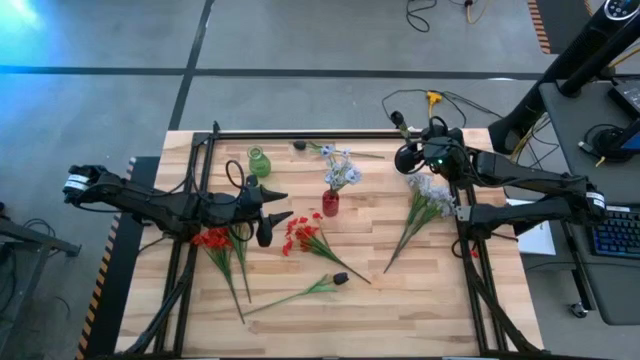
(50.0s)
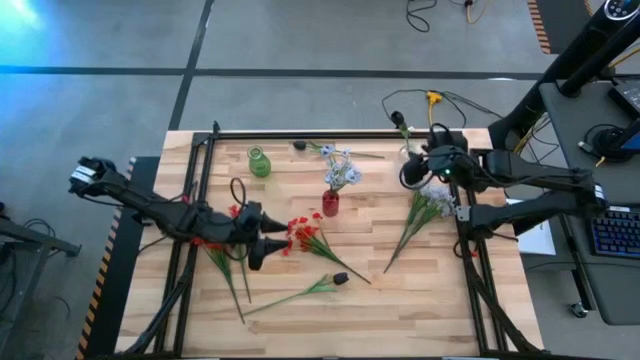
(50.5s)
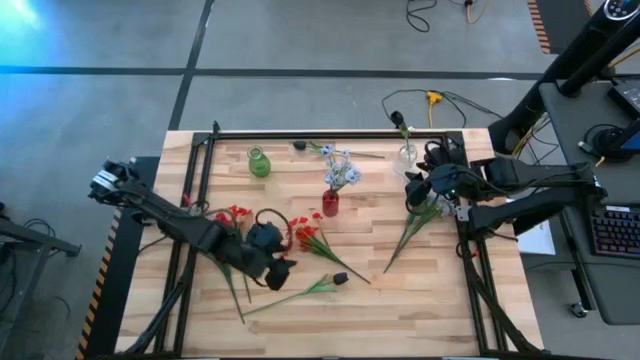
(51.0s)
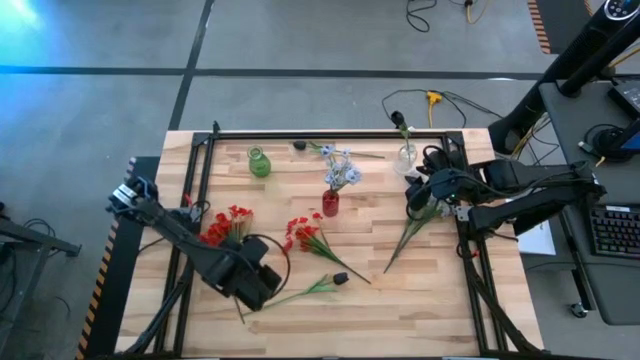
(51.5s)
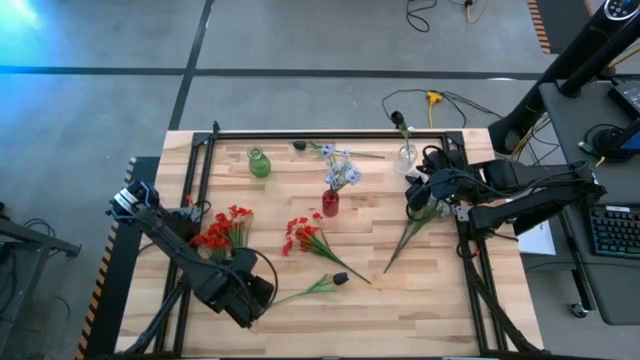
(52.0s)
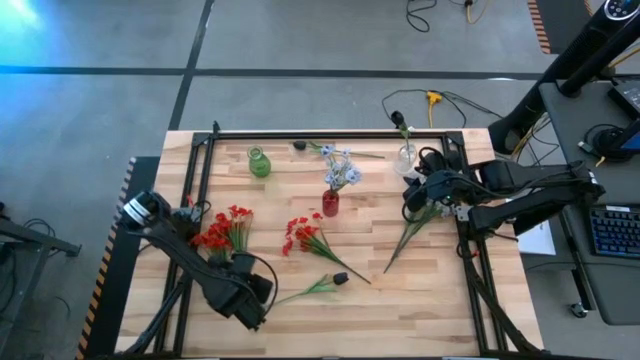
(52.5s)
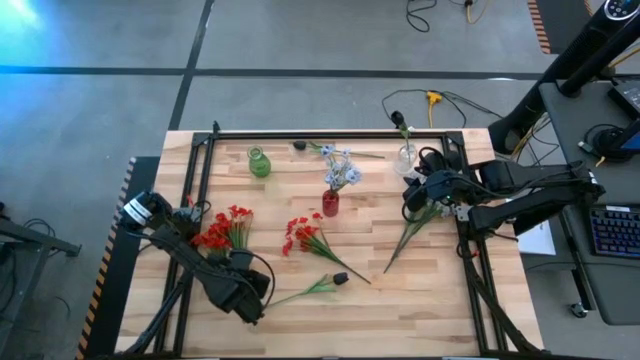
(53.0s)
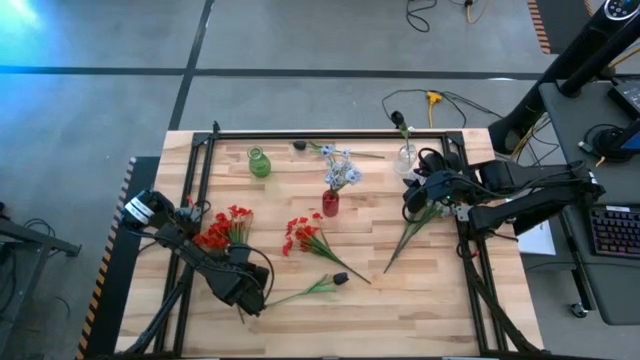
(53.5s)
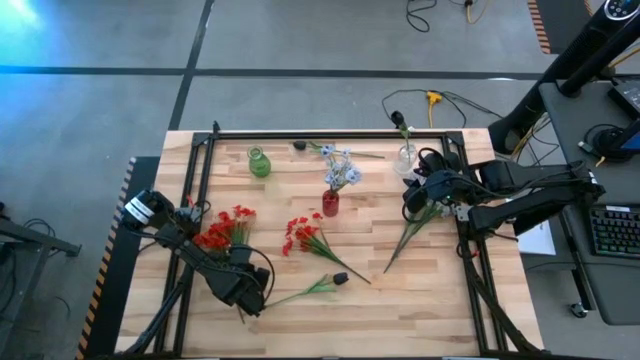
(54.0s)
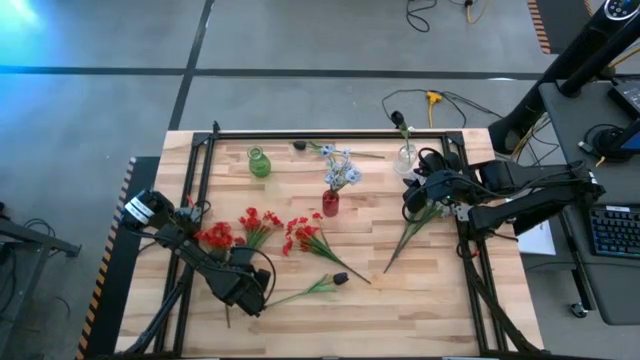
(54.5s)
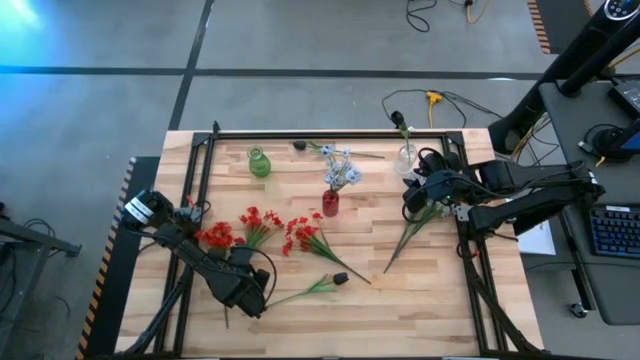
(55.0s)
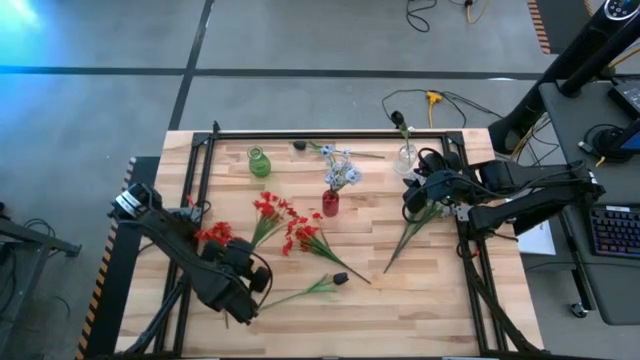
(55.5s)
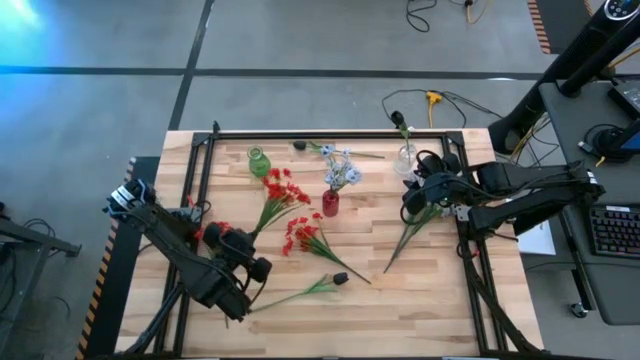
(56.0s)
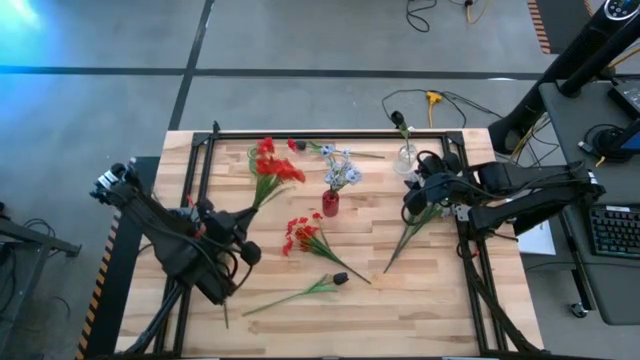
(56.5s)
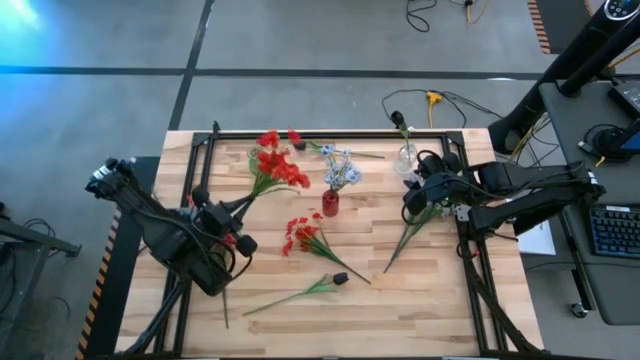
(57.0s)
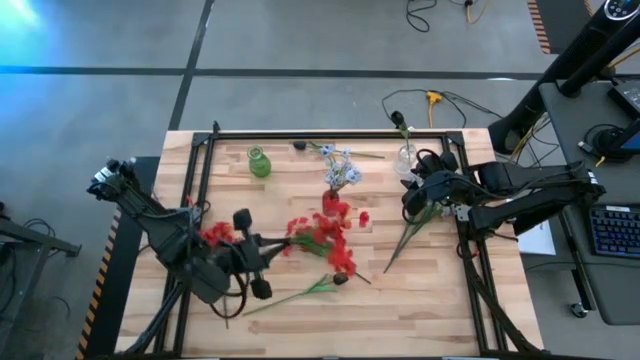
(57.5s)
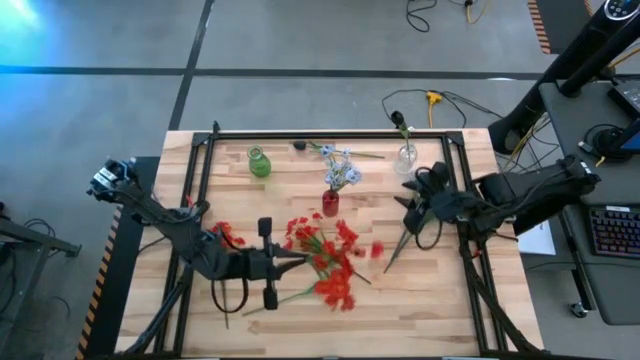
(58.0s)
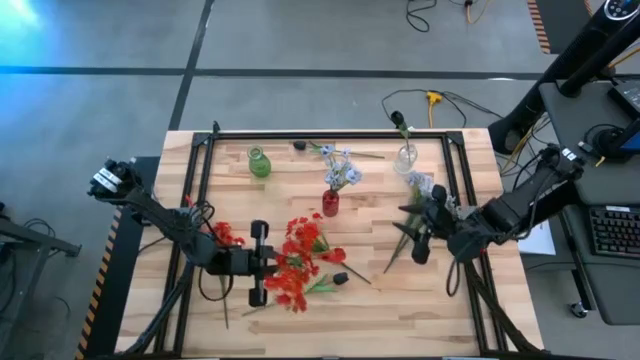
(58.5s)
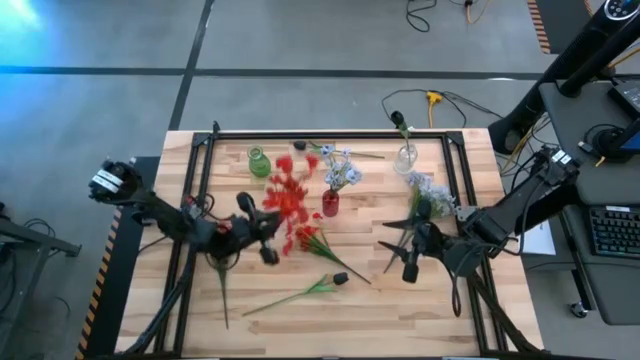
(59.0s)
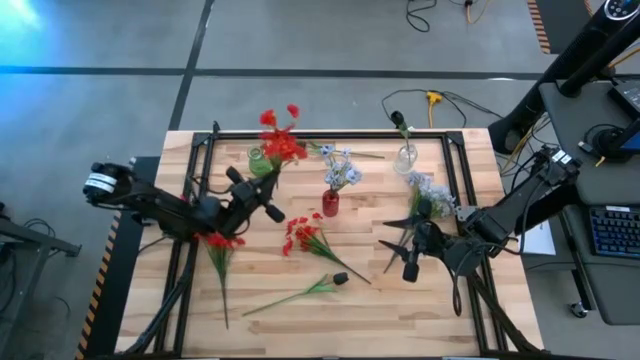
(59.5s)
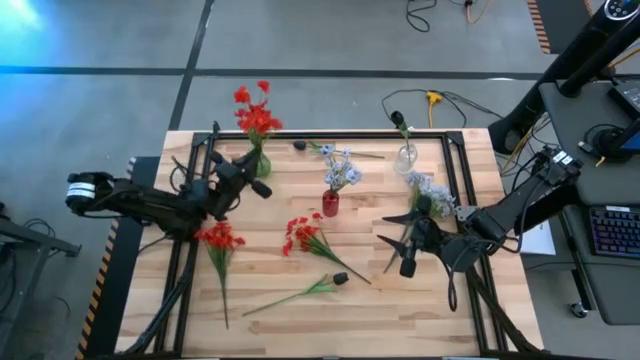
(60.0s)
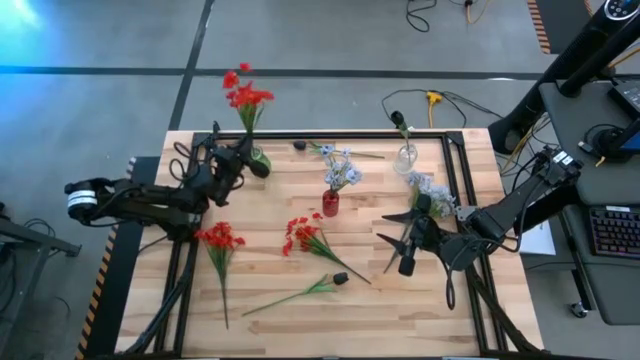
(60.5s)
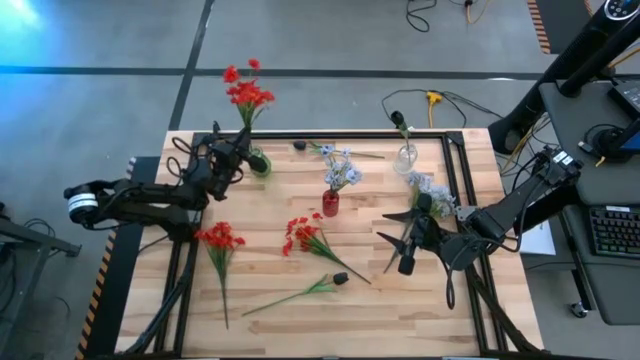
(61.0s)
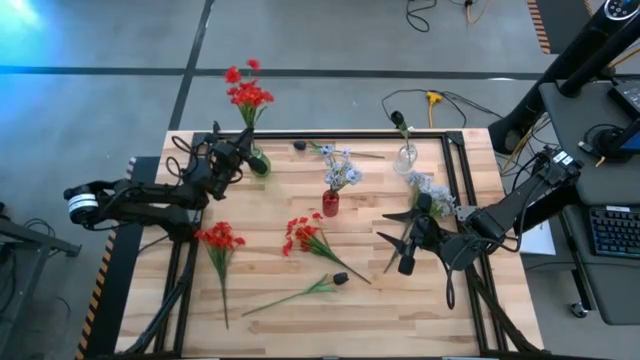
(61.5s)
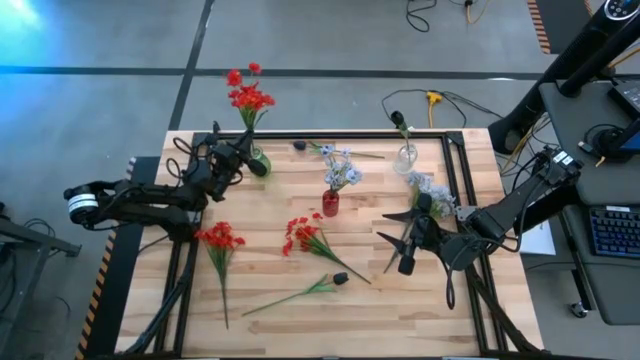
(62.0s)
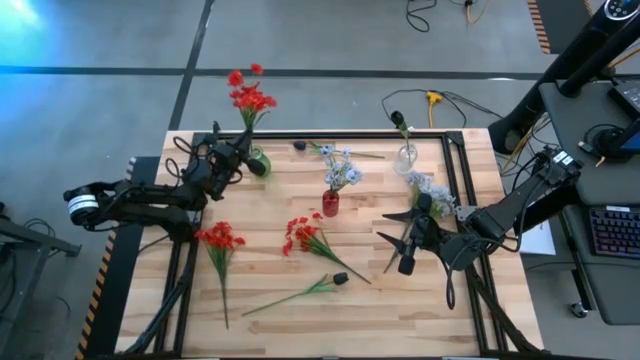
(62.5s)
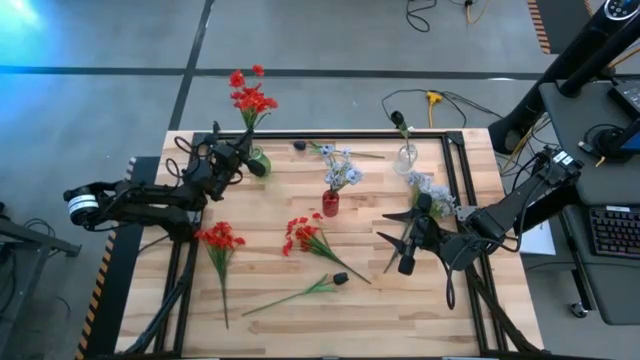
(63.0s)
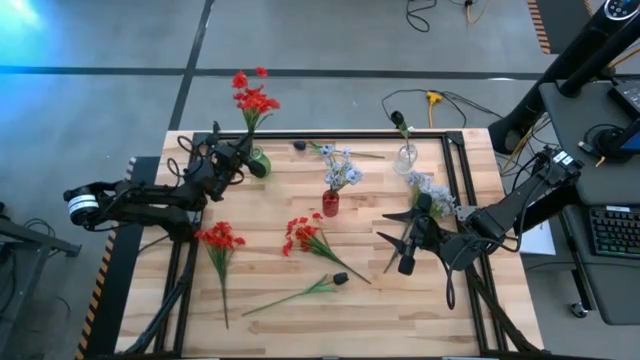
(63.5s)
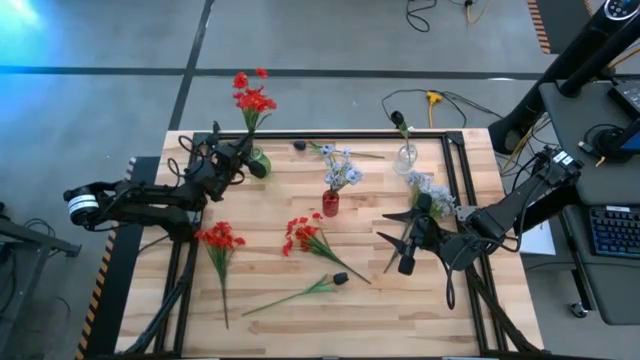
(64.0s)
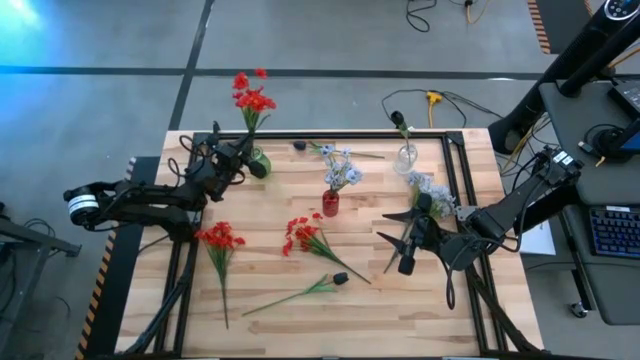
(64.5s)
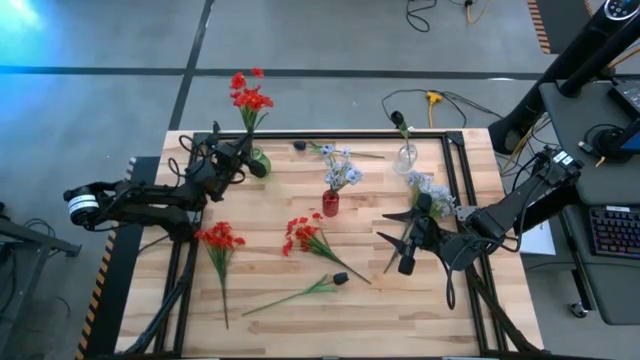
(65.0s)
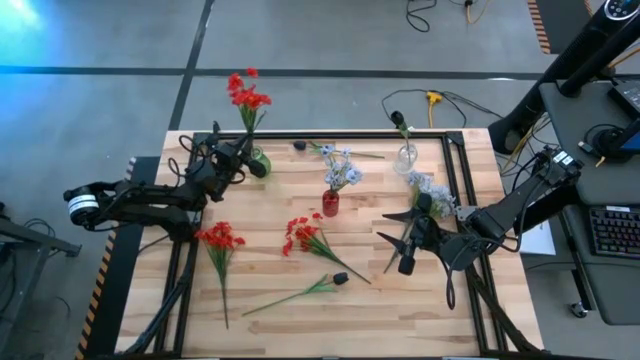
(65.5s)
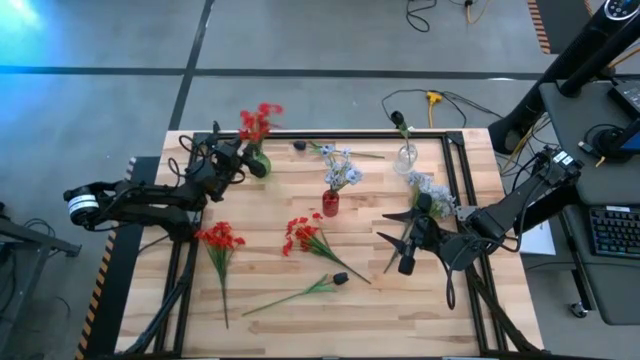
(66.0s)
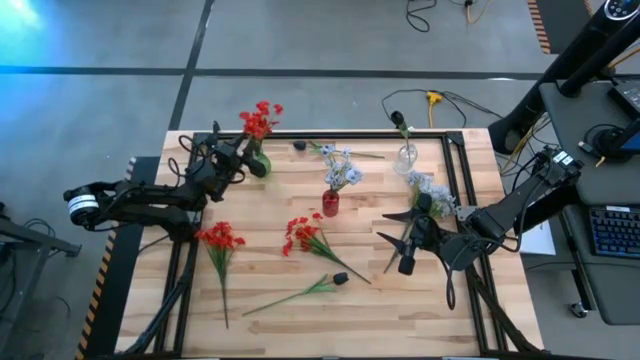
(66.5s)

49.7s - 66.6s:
Task: Sort flowers into vase by color
Put the middle red flowers into the green vase

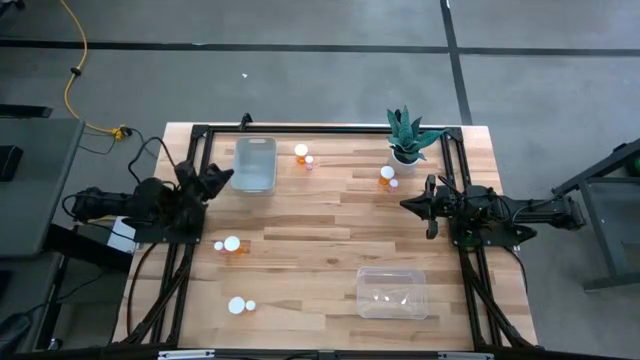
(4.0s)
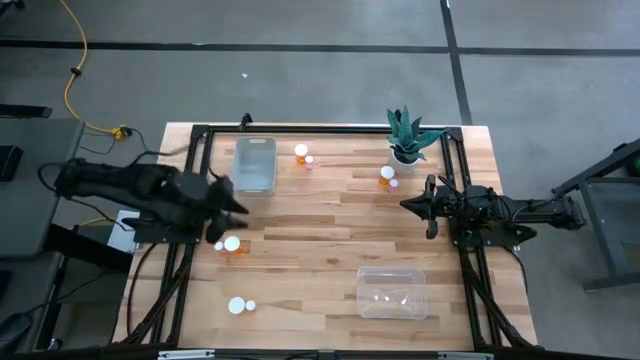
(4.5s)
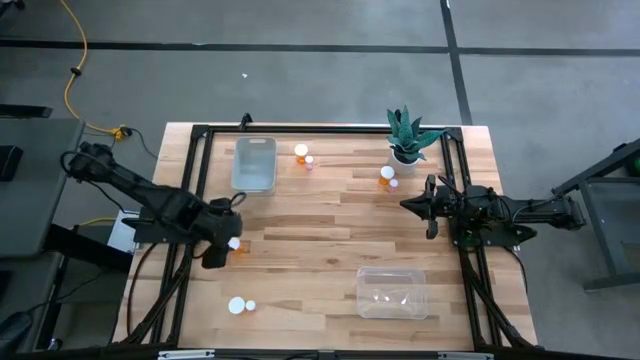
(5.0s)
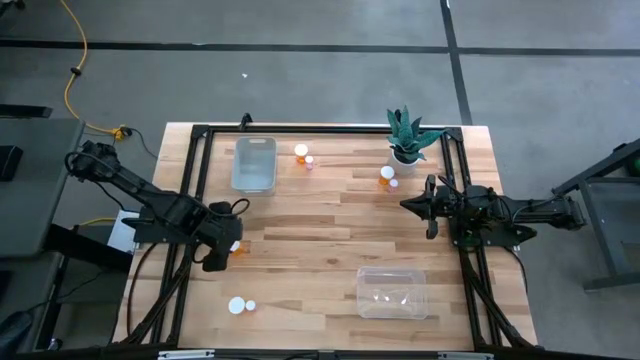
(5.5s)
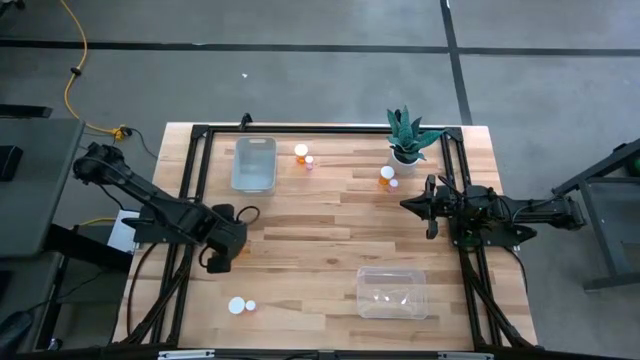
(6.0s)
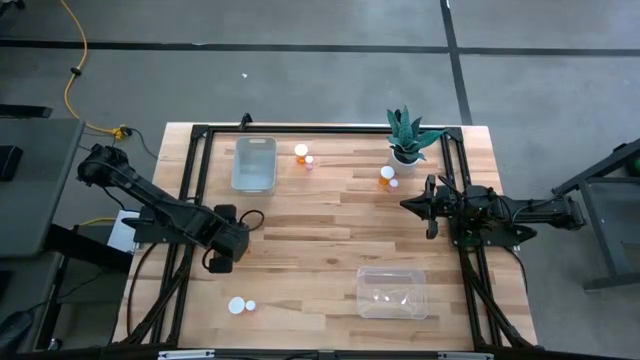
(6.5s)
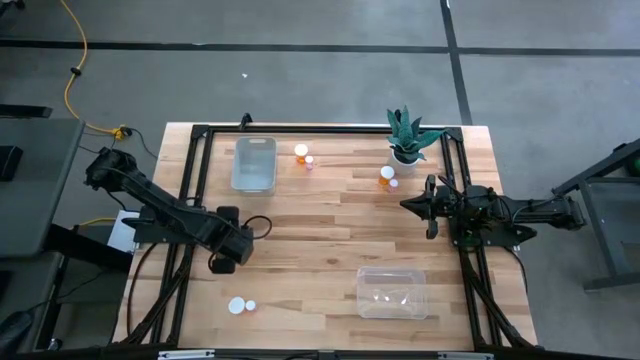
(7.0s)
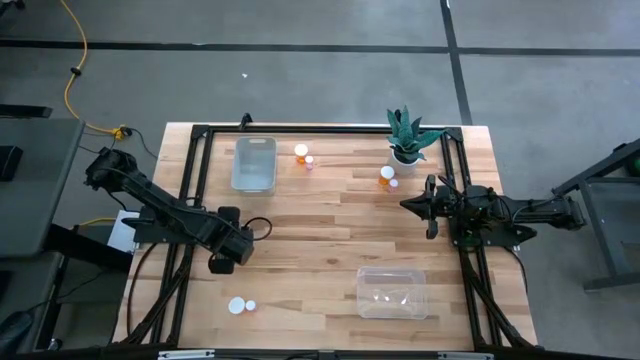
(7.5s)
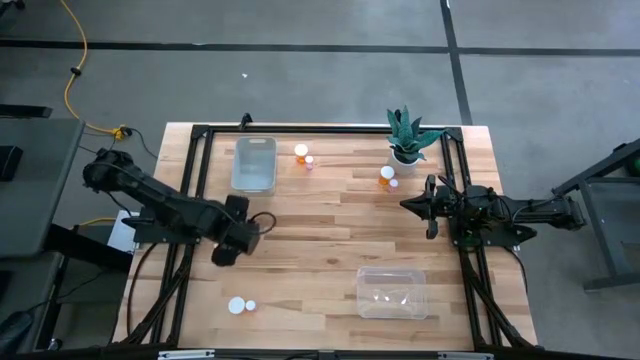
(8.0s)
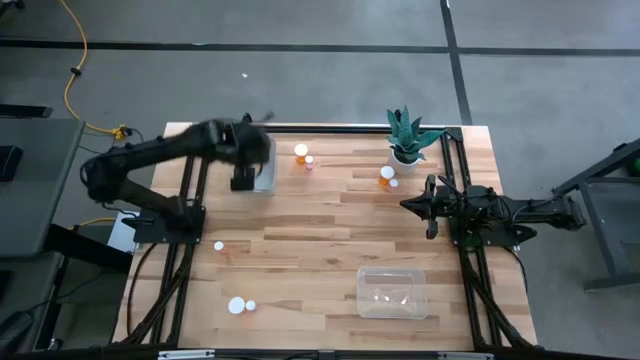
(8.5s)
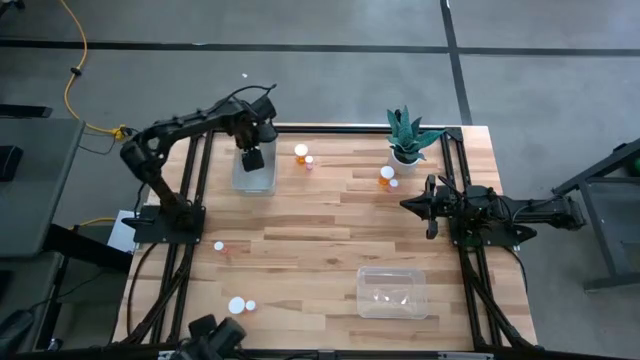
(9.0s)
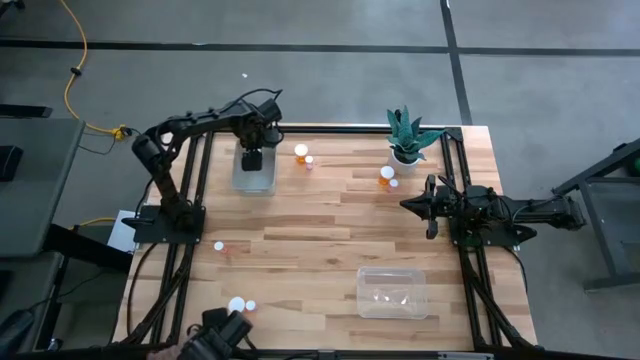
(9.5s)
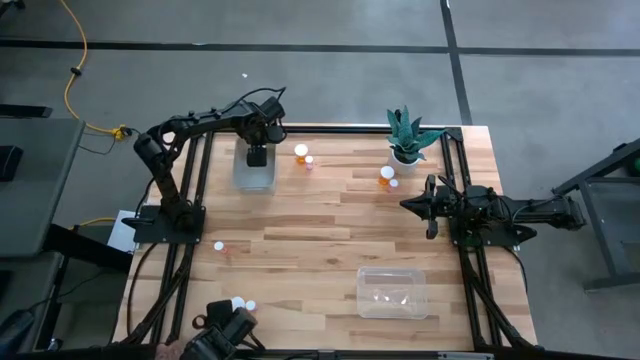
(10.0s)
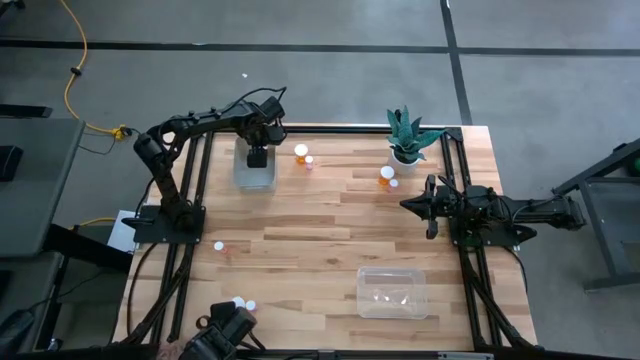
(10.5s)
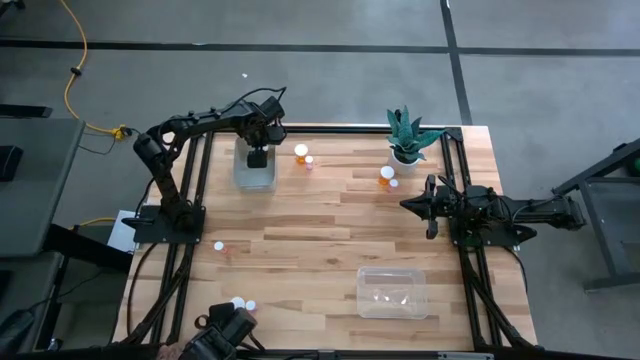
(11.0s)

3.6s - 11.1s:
Task: Pick and place medicine bottles into bin by pill shape (circle, oval)
Put the large orange pill bottle into the gray bin
